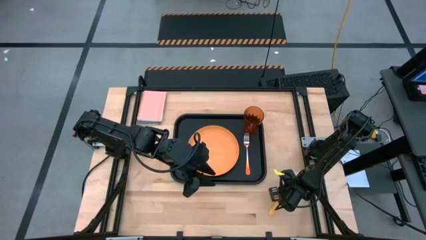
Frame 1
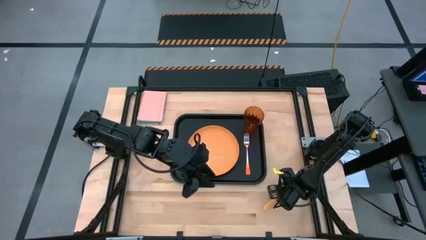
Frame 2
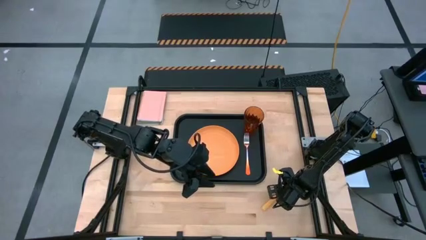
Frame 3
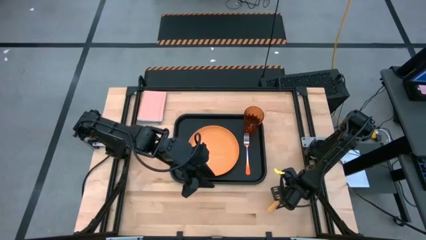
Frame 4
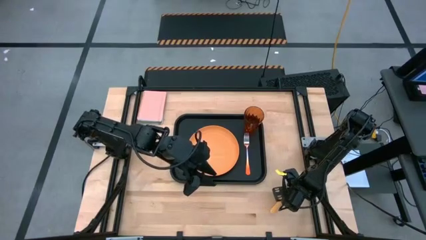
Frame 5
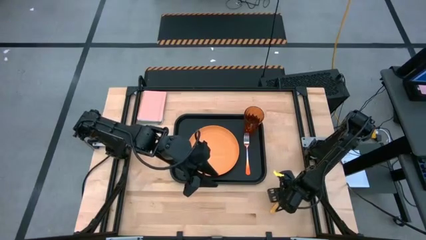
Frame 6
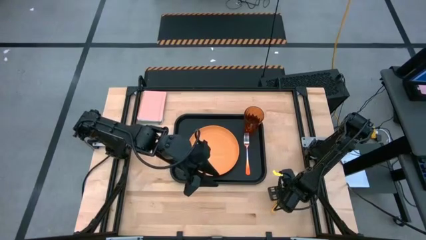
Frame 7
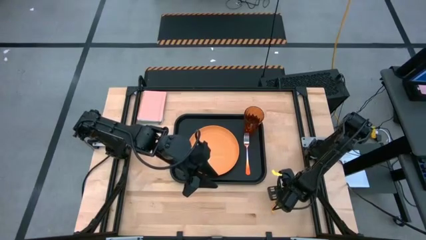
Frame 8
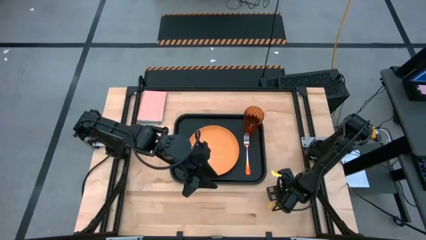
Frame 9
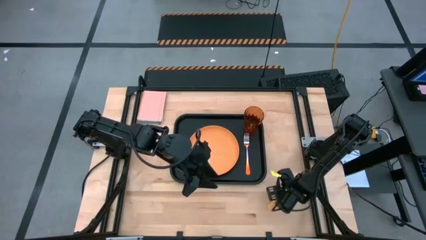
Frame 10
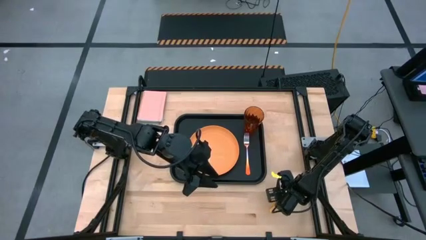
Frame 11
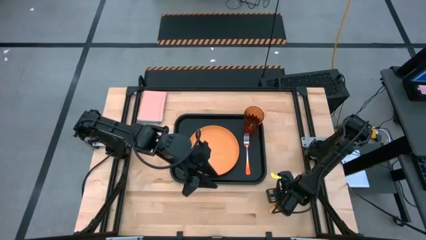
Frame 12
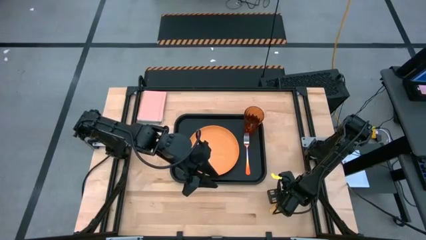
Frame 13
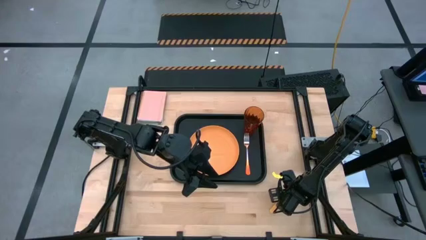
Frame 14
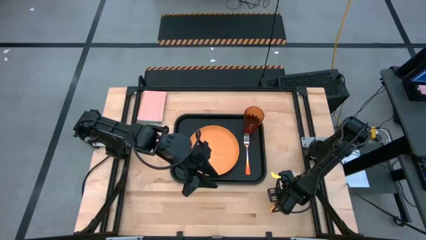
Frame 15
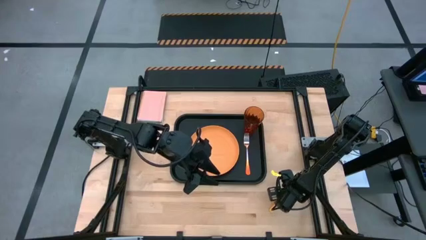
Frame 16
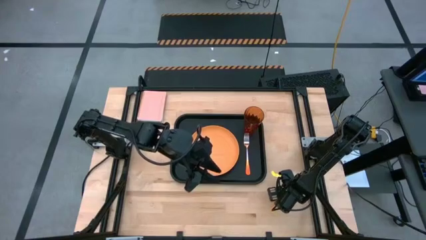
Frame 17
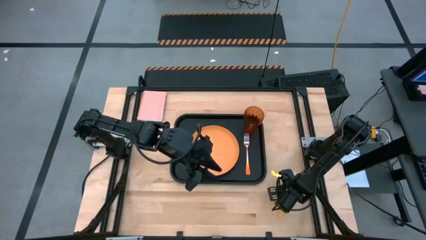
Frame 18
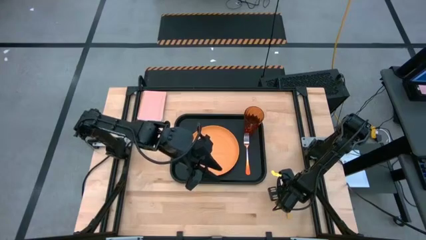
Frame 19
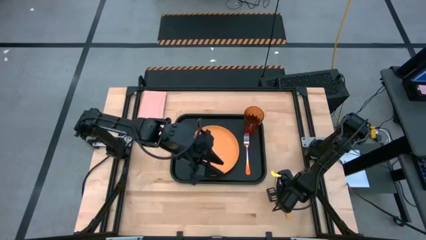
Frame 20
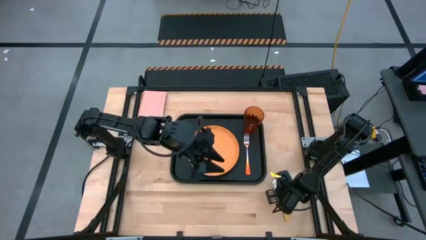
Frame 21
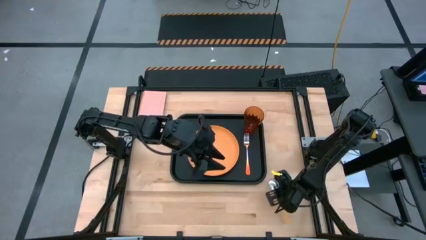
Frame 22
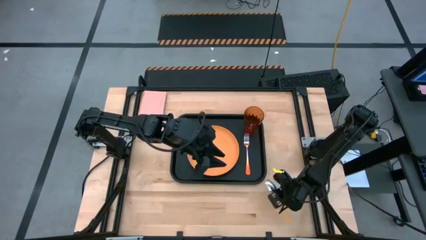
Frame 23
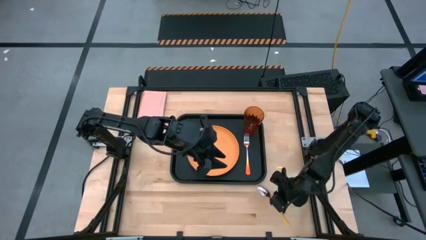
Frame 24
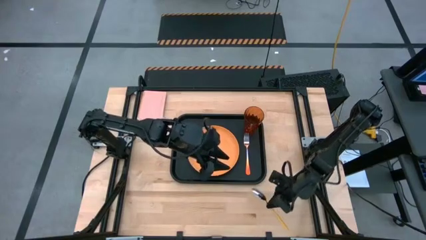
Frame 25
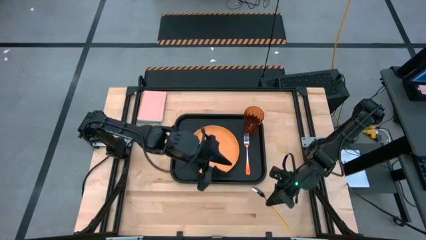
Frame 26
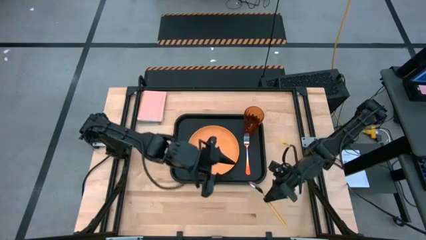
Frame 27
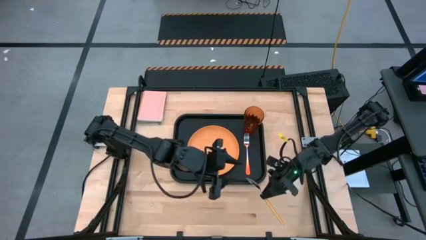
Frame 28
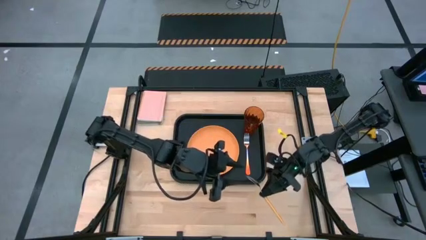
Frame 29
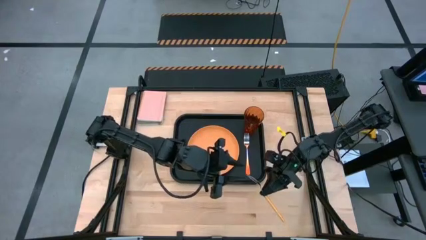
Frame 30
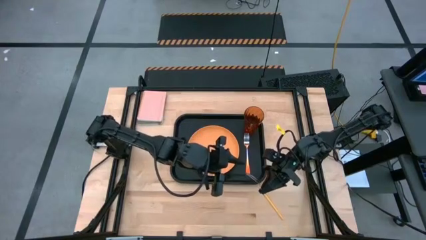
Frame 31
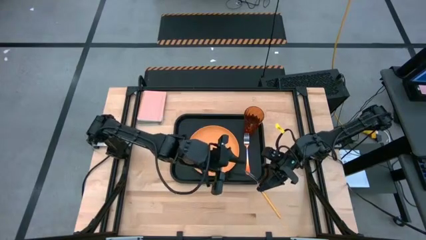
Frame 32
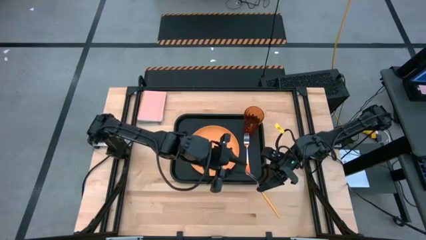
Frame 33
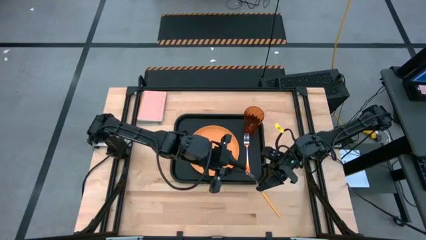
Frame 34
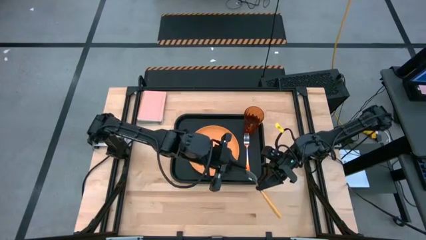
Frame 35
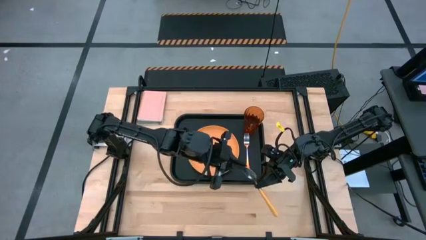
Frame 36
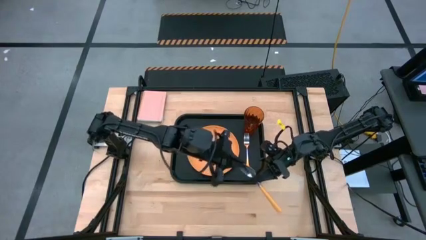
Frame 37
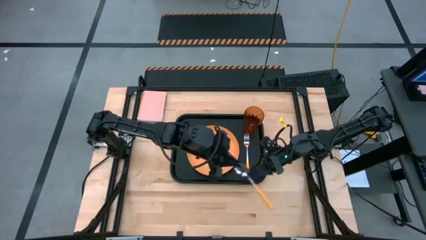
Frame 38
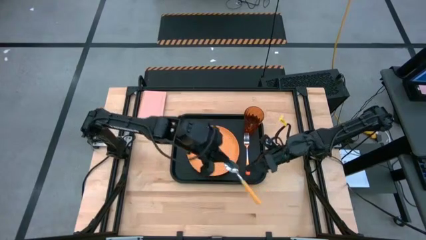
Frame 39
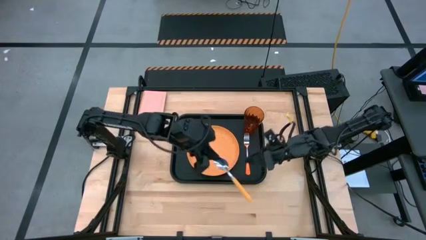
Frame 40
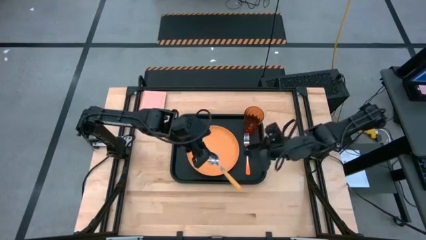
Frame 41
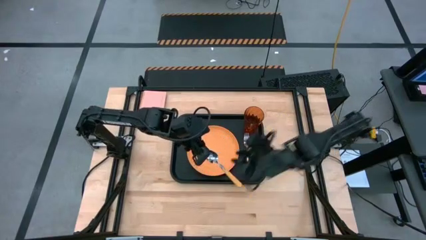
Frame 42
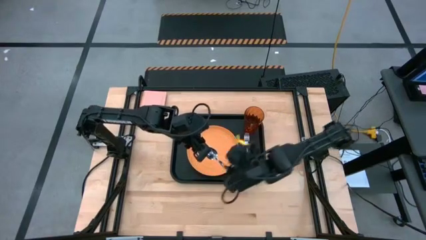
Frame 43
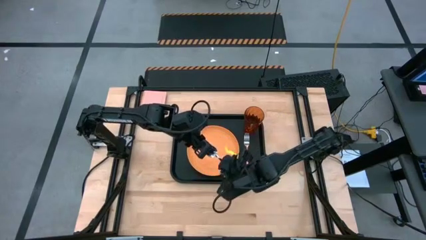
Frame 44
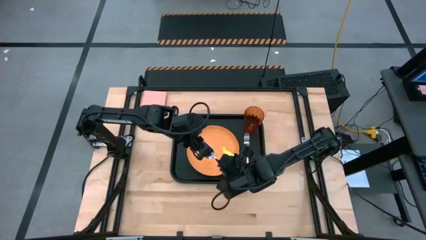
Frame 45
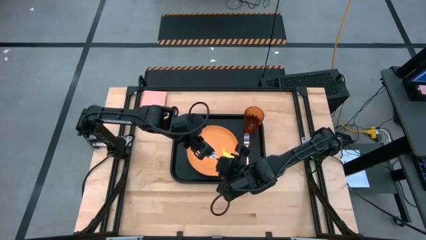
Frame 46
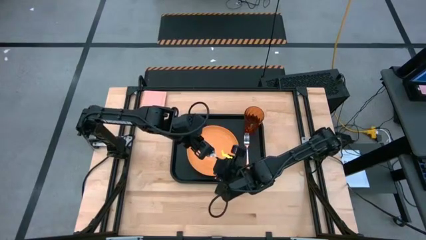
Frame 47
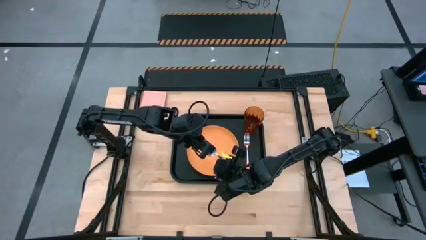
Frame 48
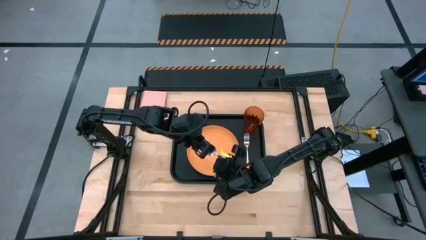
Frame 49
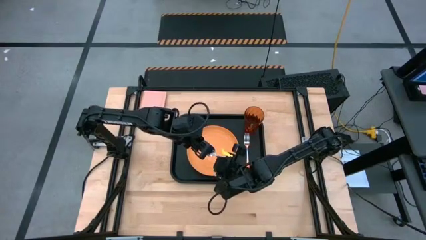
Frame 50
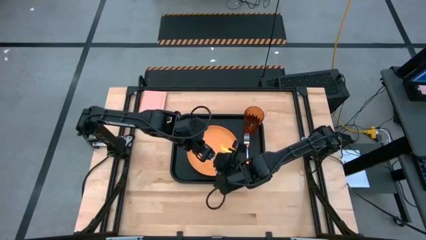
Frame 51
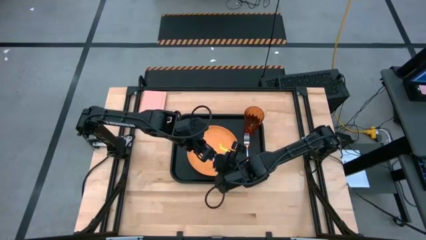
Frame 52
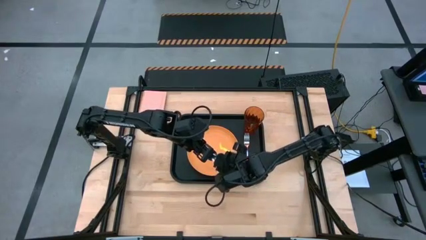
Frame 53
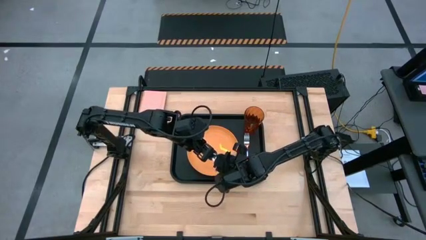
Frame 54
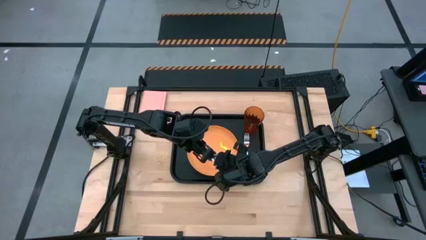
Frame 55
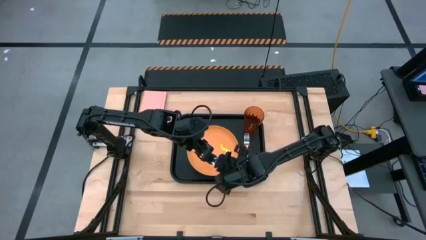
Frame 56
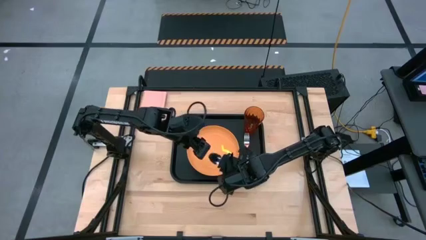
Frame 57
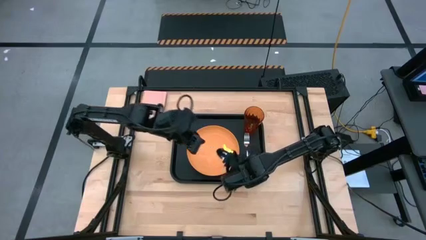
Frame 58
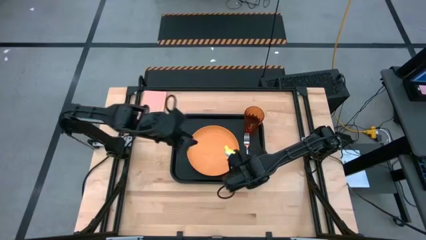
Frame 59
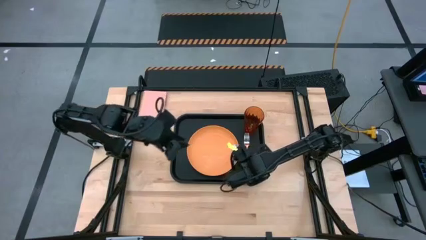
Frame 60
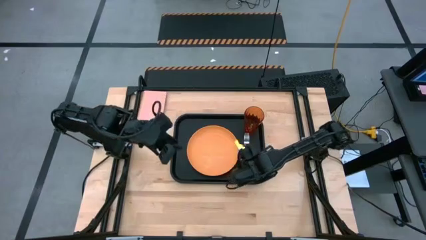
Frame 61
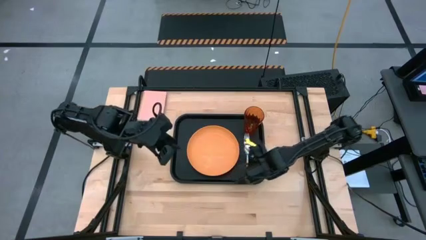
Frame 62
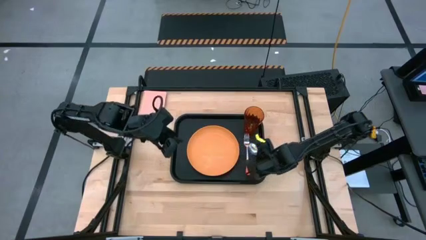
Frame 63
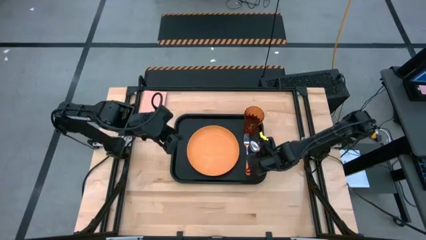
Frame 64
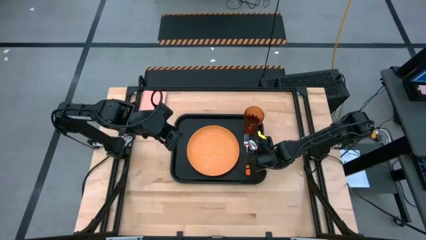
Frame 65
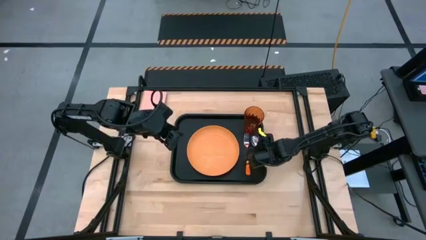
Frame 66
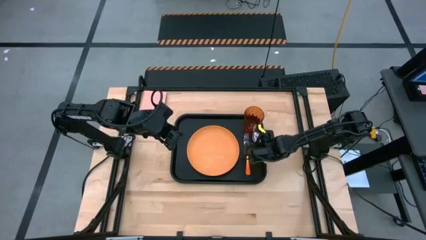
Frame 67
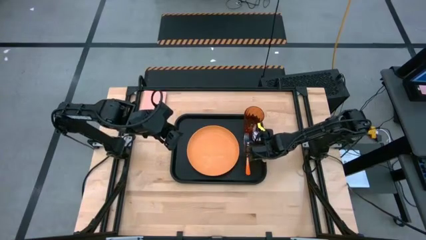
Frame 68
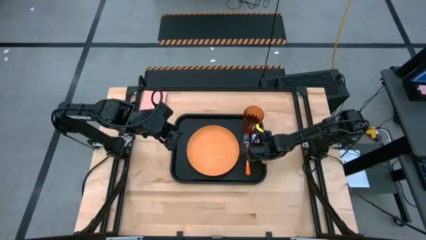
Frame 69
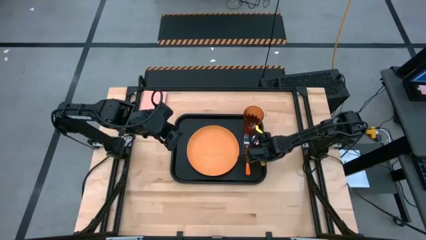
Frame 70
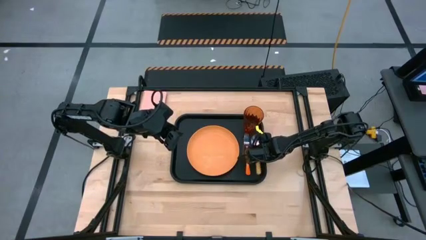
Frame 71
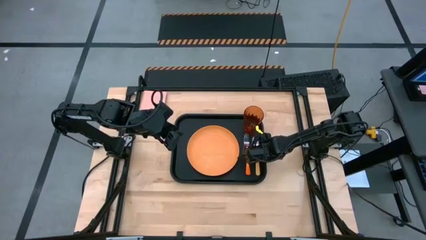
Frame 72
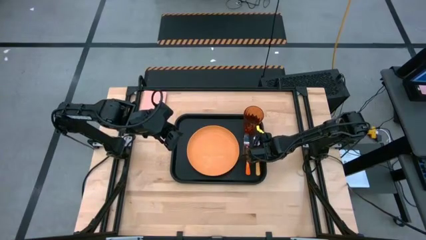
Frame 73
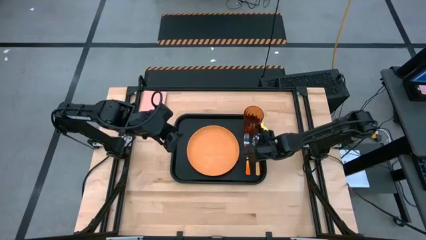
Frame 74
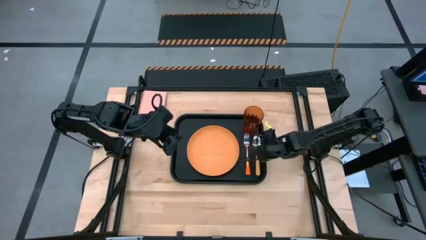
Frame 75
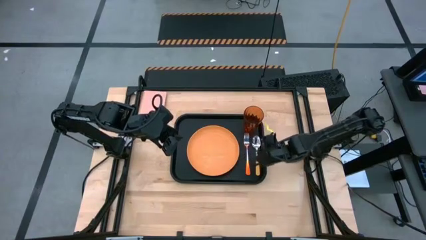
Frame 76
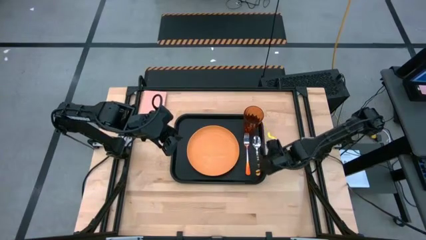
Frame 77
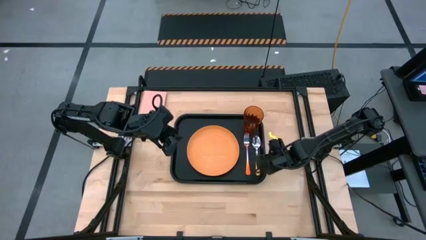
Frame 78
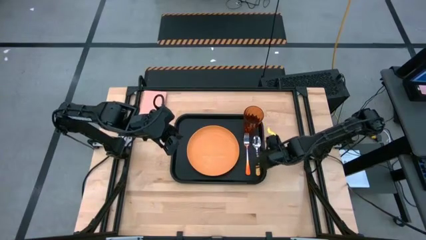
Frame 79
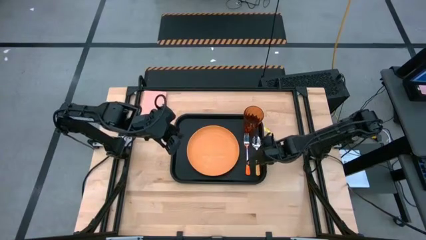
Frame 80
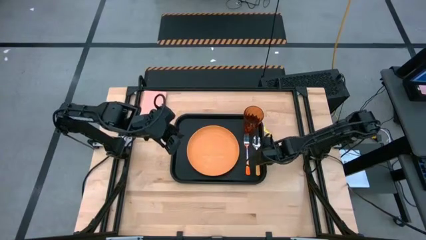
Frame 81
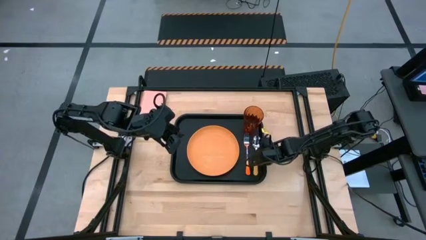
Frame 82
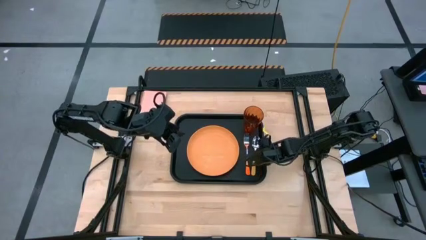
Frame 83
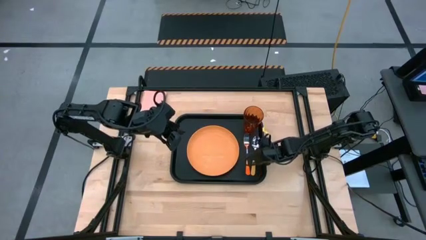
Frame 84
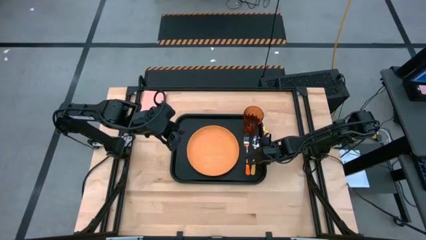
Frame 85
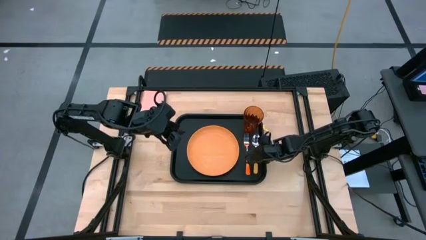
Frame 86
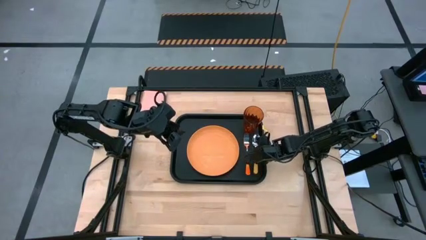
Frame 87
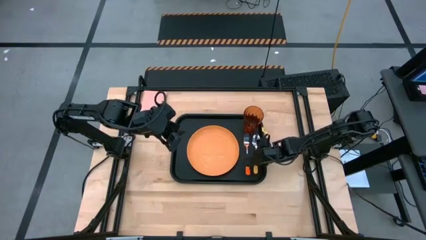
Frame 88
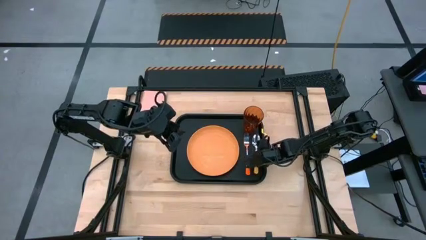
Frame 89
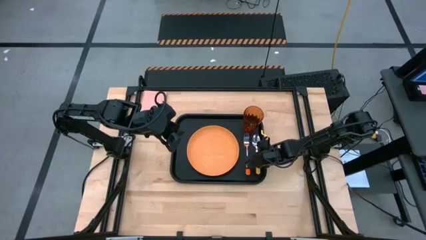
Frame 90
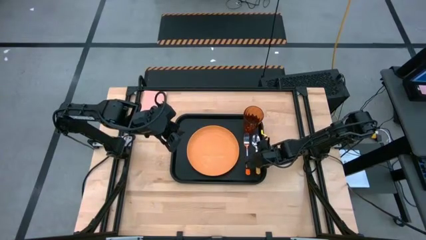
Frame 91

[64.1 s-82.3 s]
Task: Pick and place plate/cup/fork/spoon on tray
Put the light orange spoon on the black tray to the right of the orange fork
